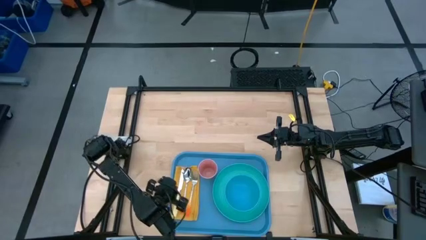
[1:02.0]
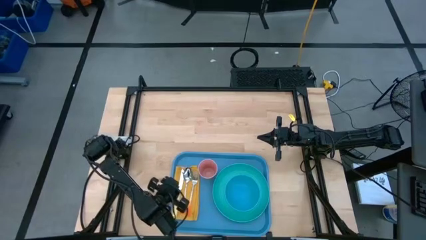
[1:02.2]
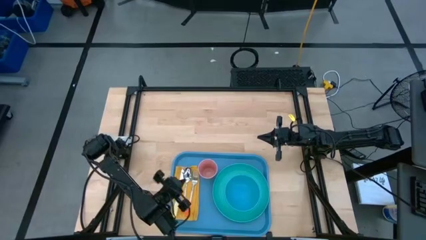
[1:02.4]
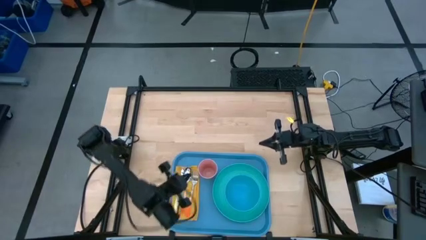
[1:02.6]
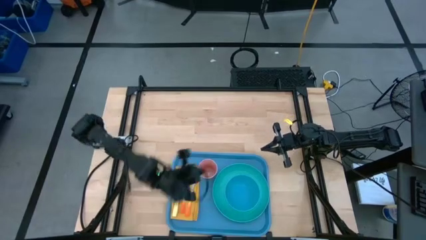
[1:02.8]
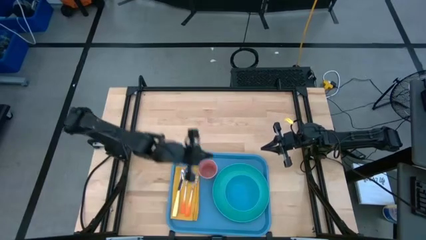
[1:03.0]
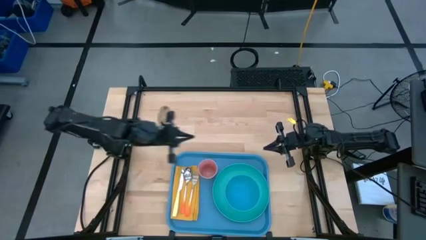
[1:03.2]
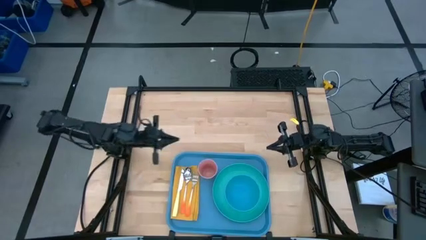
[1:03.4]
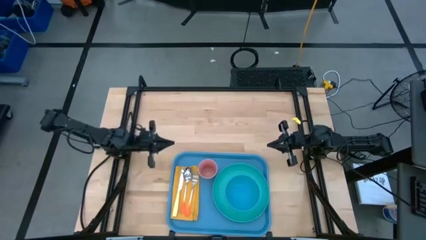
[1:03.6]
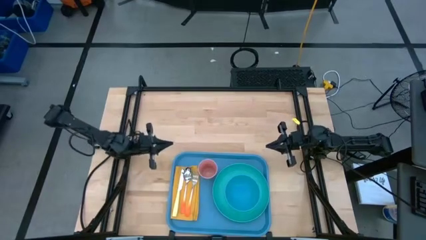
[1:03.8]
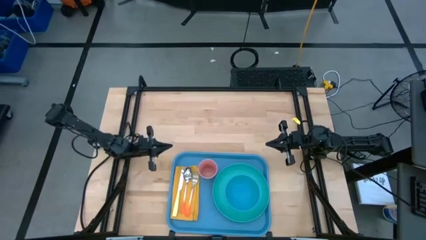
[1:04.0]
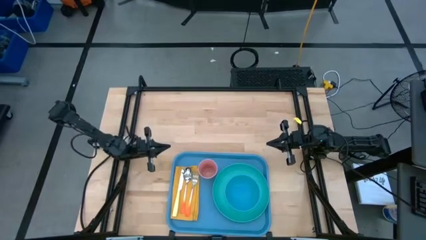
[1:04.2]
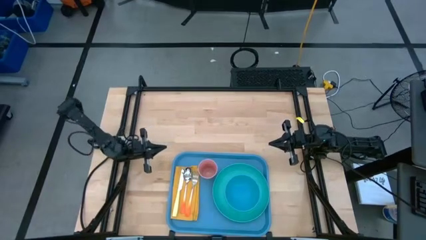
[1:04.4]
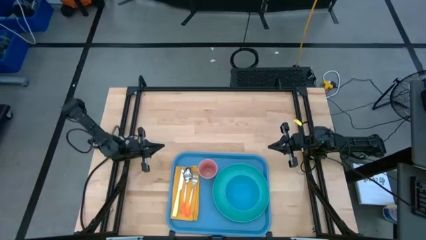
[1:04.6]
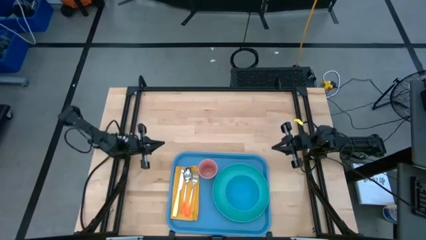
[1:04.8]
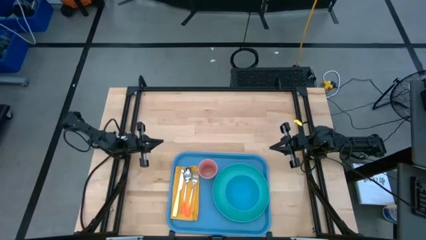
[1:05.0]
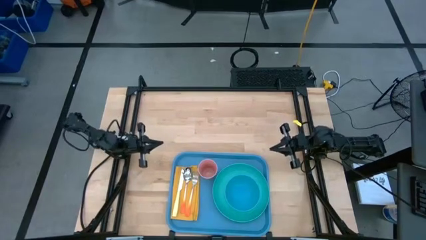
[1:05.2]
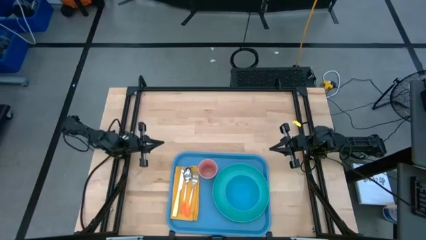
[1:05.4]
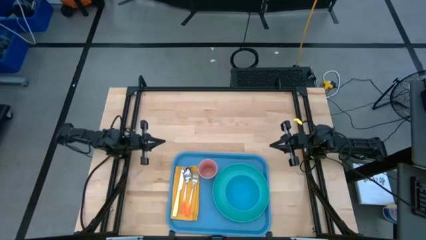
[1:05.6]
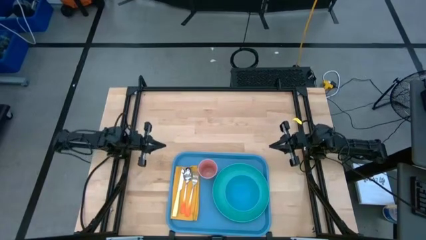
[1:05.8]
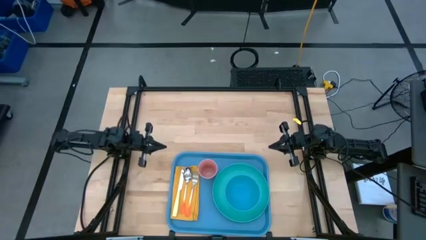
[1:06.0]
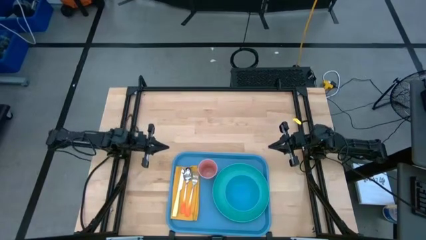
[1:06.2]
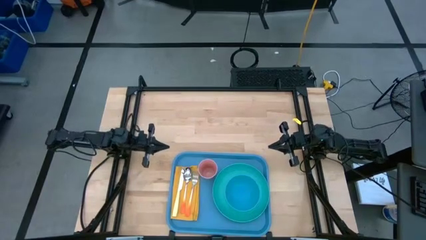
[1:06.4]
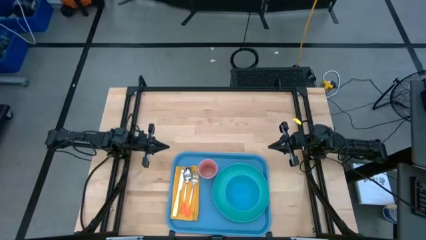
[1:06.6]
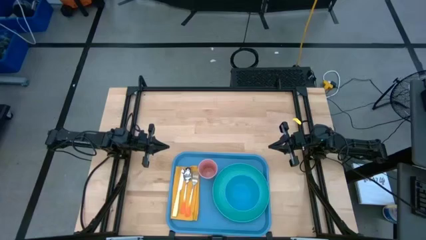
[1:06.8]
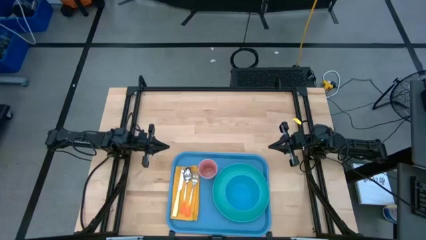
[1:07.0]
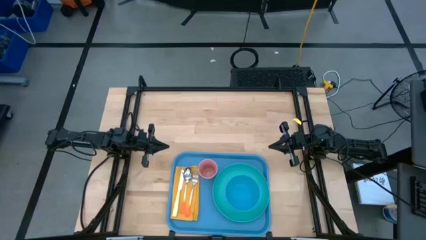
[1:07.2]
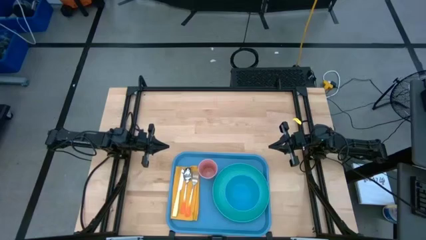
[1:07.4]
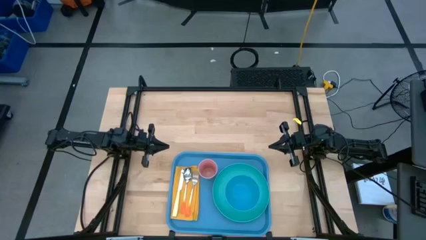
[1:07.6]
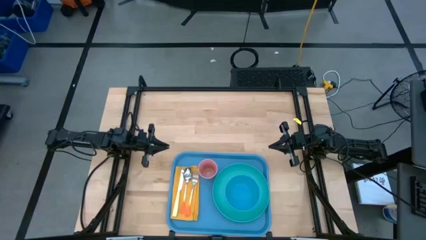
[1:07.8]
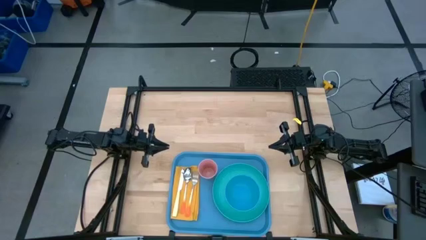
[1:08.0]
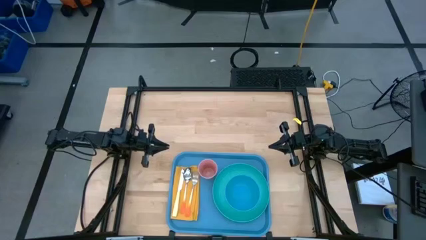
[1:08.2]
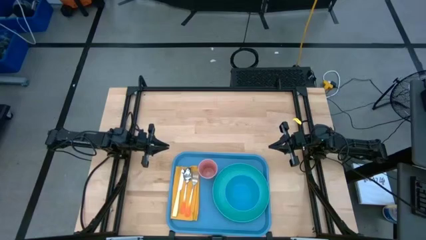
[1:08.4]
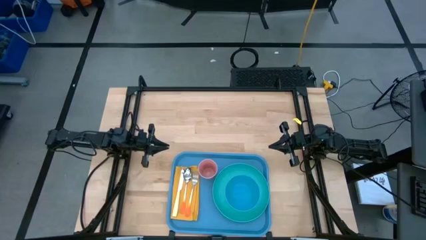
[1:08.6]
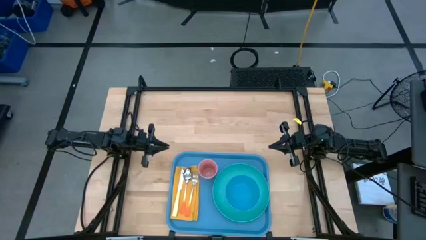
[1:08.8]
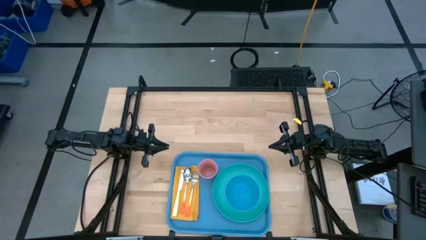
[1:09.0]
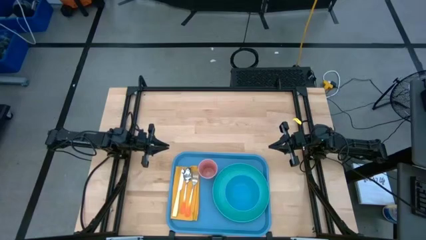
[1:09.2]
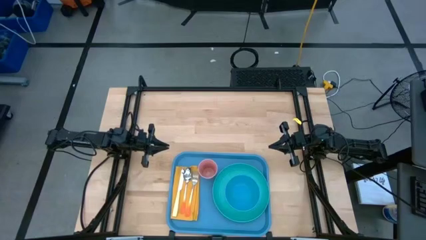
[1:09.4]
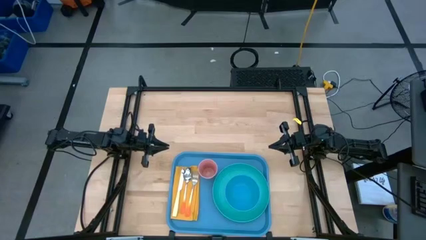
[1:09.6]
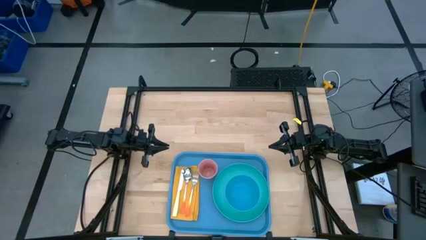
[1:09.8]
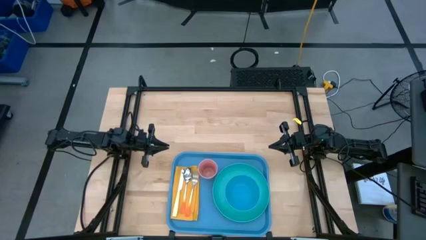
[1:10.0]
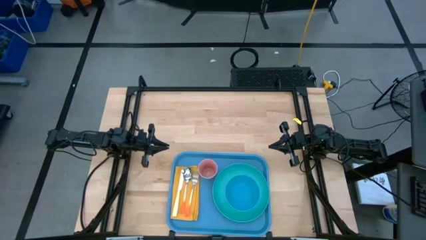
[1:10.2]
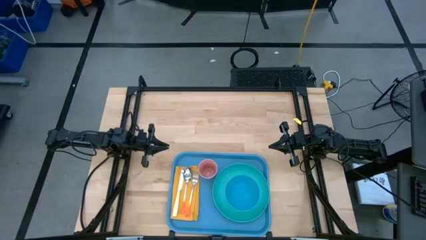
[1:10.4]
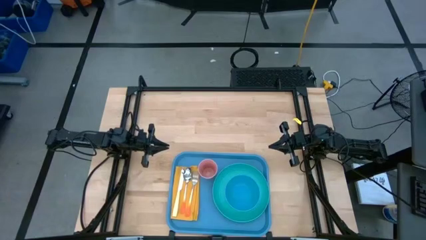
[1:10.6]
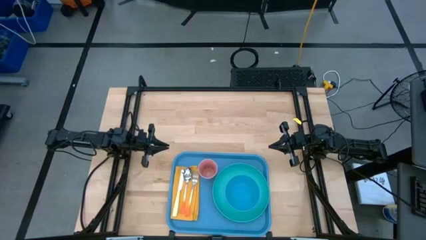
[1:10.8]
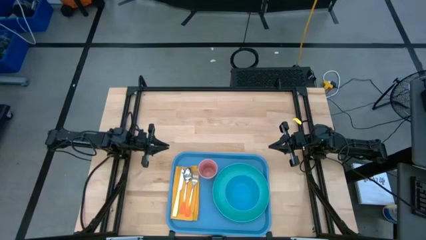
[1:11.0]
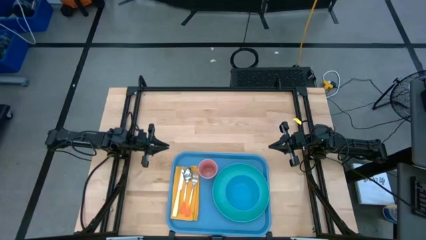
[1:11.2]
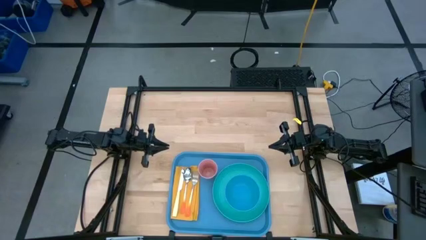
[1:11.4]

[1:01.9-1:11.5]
Task: Set up tray
Return to Home Position

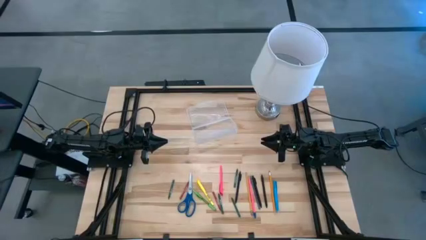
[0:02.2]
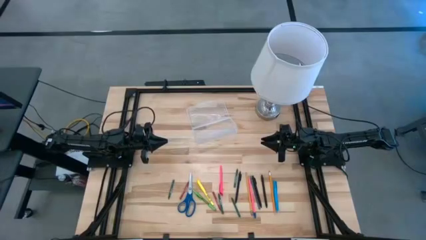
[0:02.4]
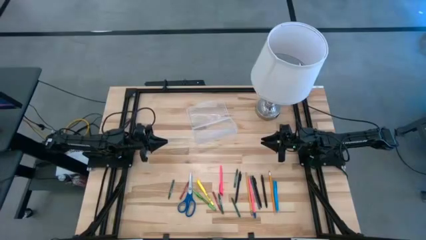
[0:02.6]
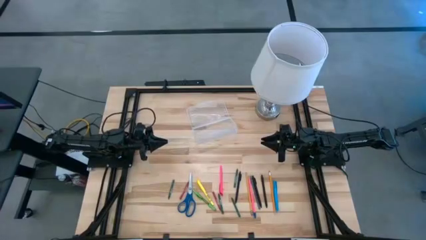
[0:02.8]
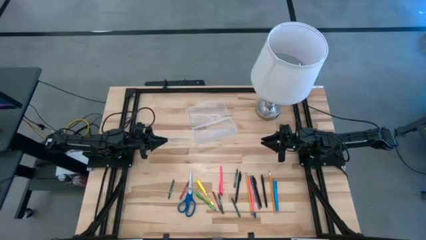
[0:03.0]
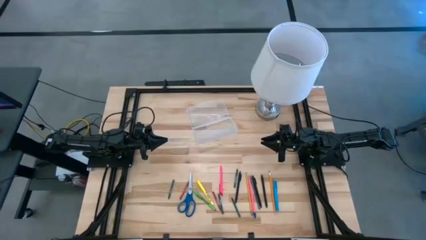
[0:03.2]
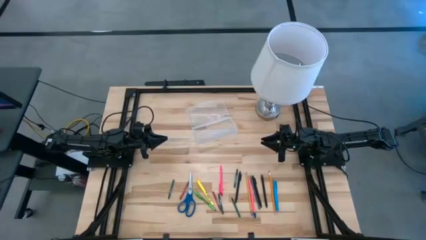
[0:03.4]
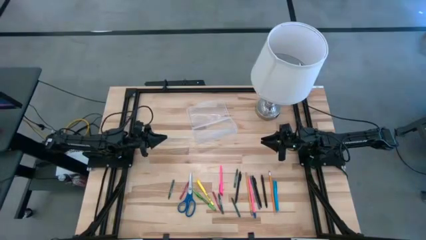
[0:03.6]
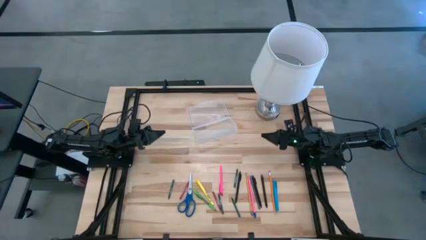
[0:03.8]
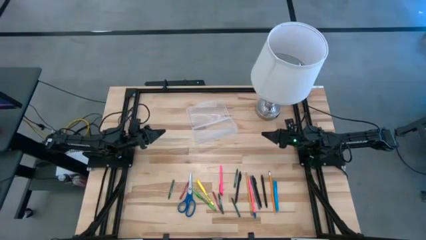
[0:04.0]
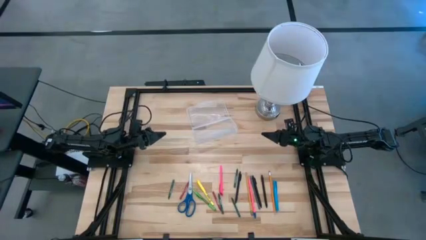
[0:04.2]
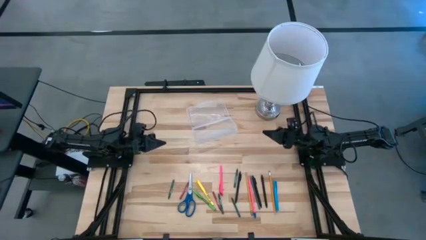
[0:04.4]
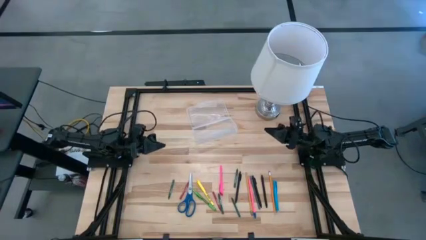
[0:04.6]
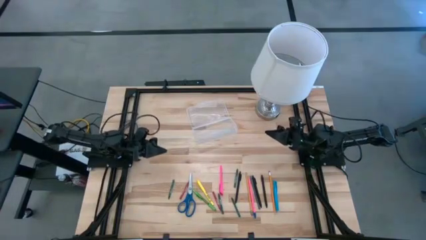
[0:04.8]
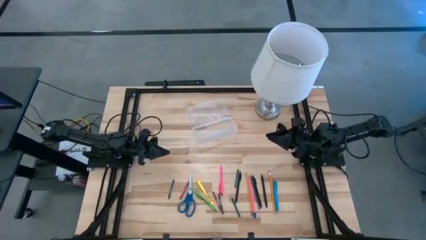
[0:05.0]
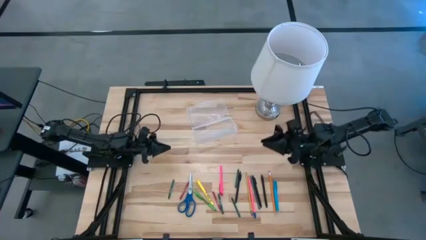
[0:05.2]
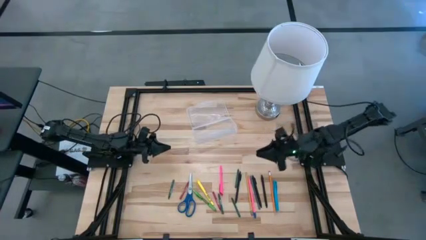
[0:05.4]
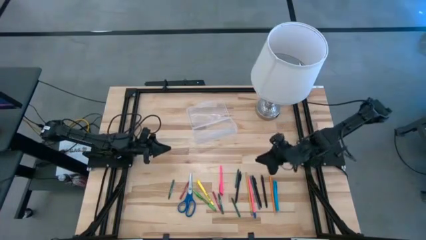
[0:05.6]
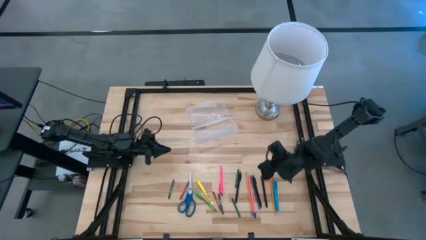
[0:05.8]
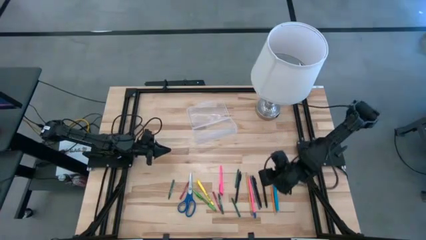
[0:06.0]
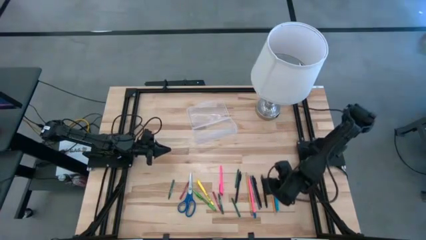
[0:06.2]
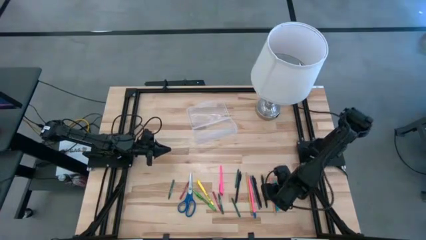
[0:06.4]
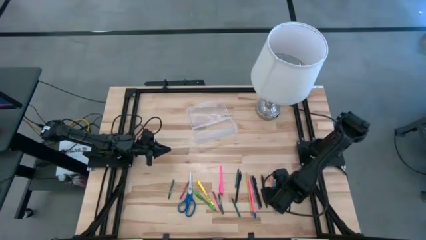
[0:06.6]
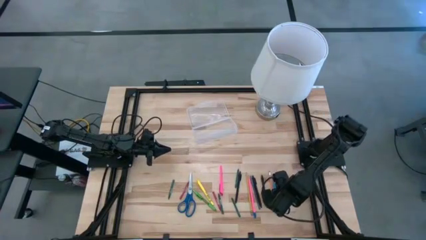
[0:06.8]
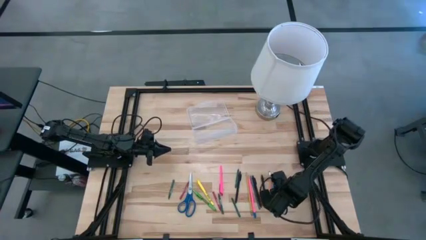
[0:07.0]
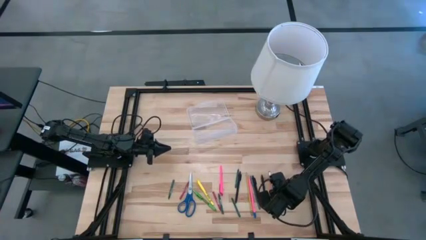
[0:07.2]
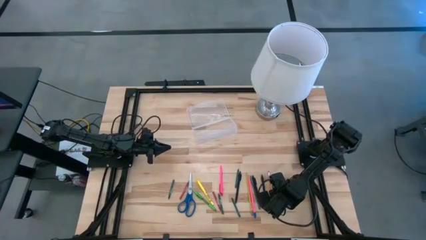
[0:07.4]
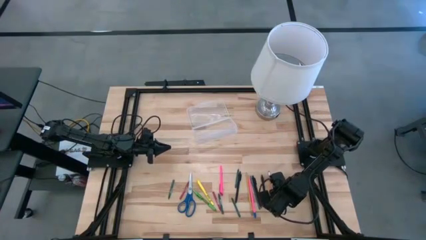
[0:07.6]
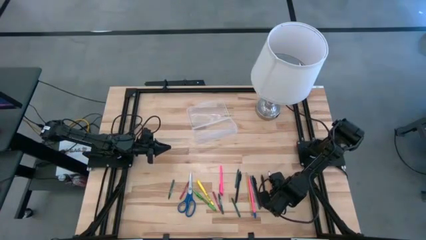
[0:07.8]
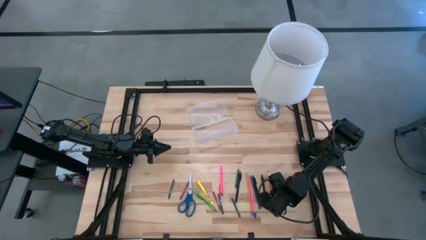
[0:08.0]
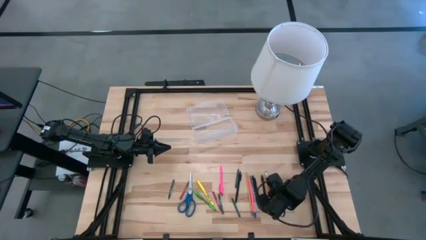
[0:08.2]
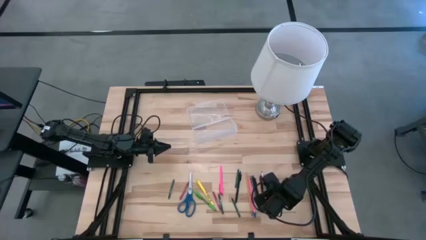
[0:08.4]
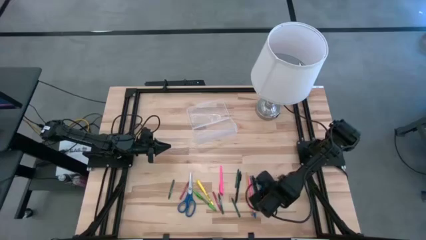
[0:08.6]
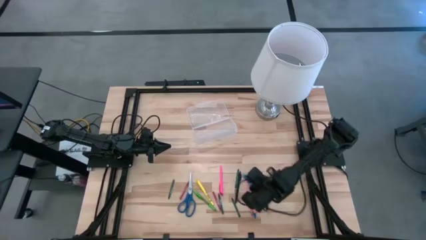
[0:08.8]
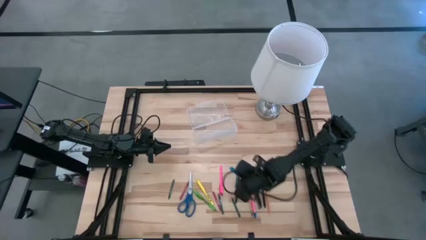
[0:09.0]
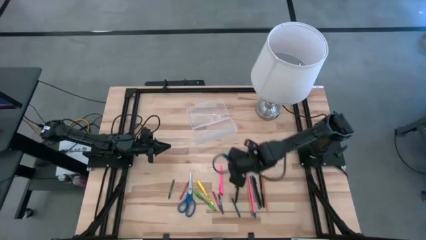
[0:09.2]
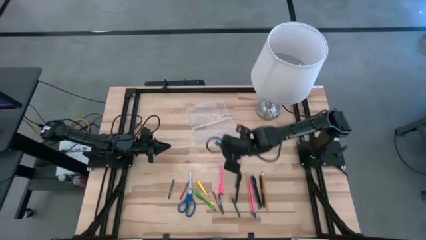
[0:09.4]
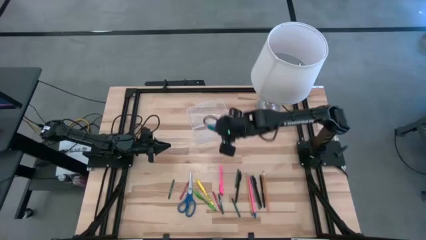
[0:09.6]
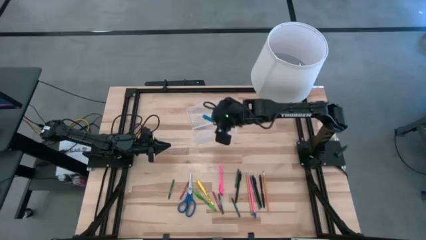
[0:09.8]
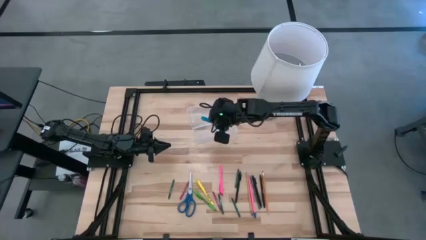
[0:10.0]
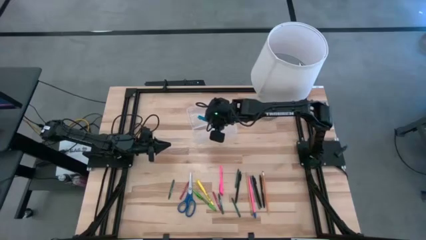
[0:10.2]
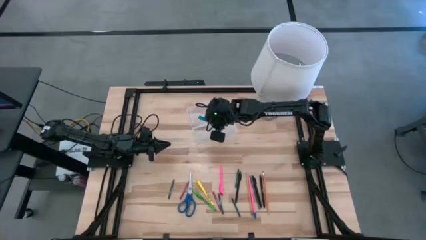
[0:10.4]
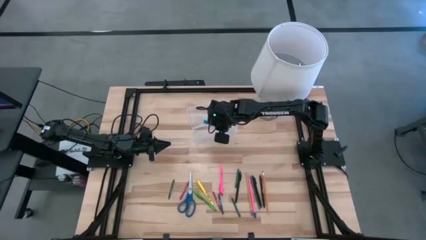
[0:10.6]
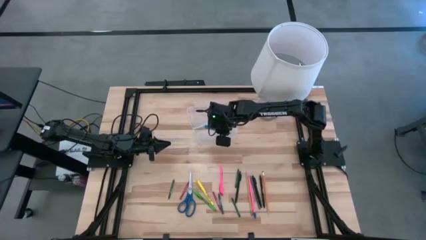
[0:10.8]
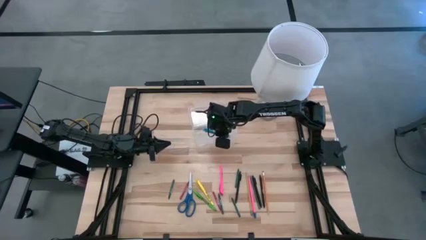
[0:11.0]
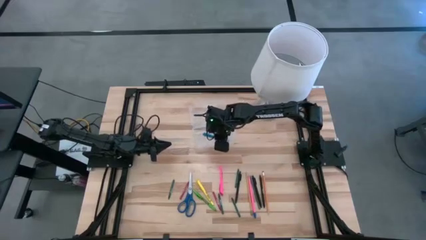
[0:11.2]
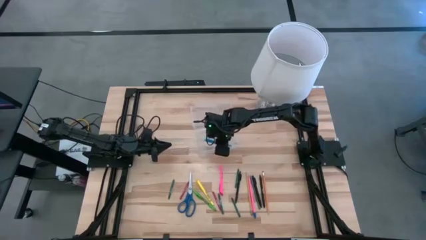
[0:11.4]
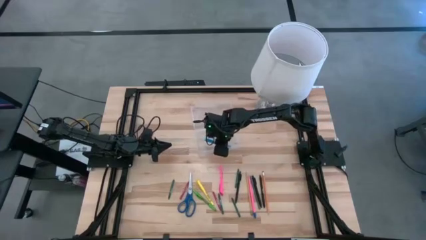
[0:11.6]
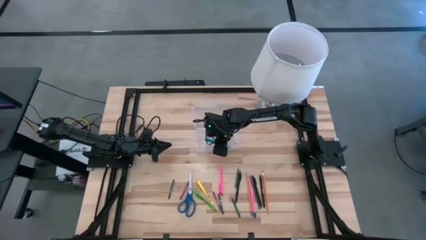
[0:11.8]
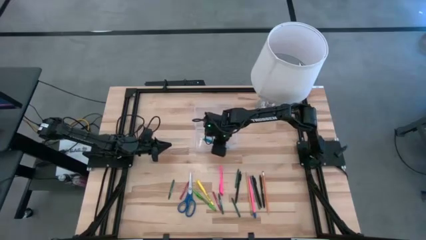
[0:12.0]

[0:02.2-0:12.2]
Task: Pick & place school supplies into a supply box
Put the blue pen into the transparent supply box
